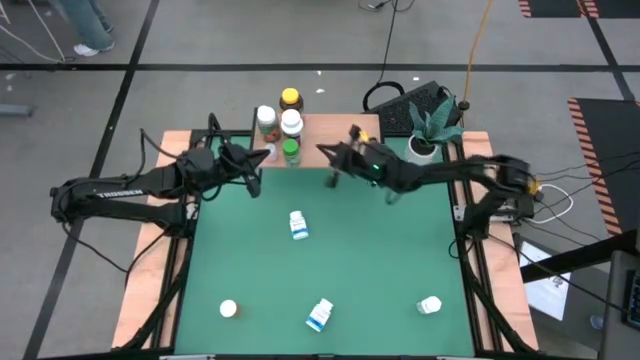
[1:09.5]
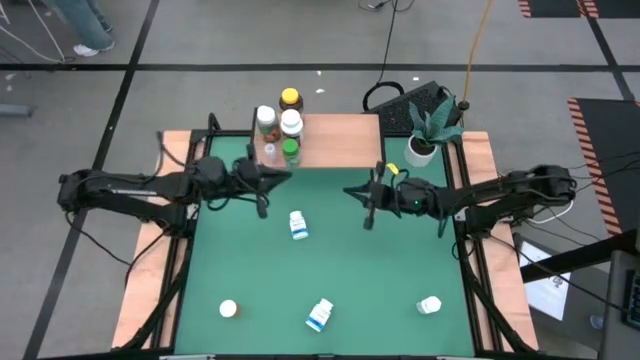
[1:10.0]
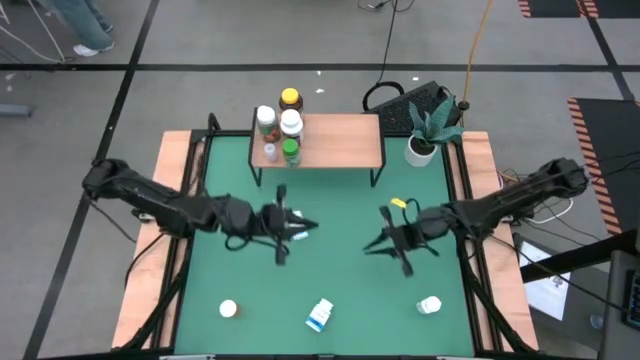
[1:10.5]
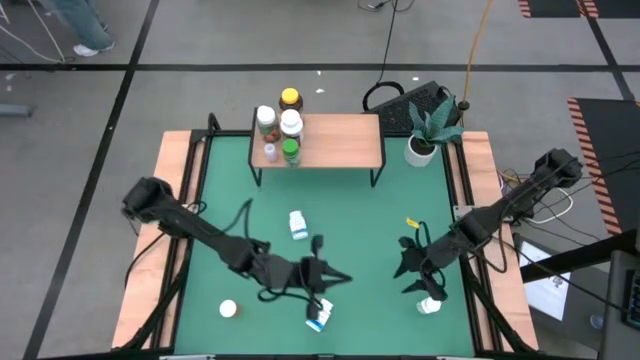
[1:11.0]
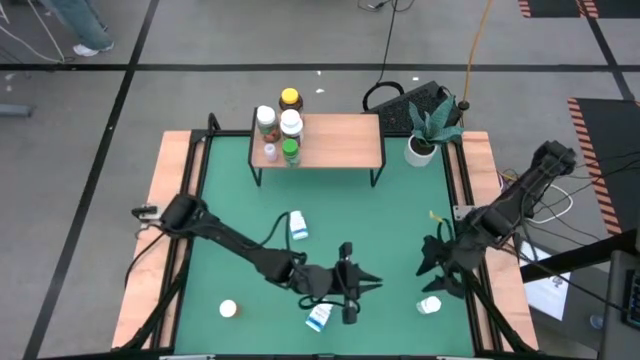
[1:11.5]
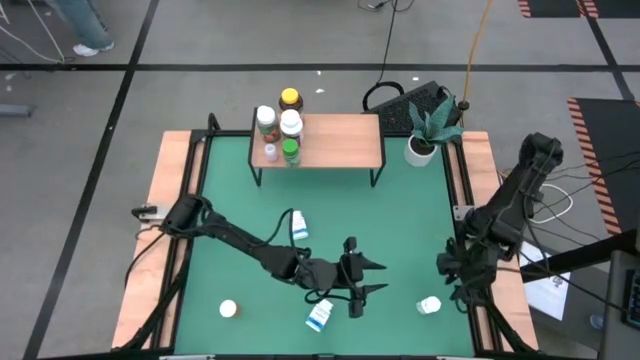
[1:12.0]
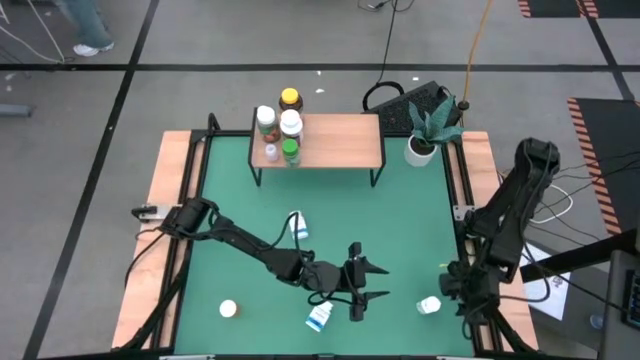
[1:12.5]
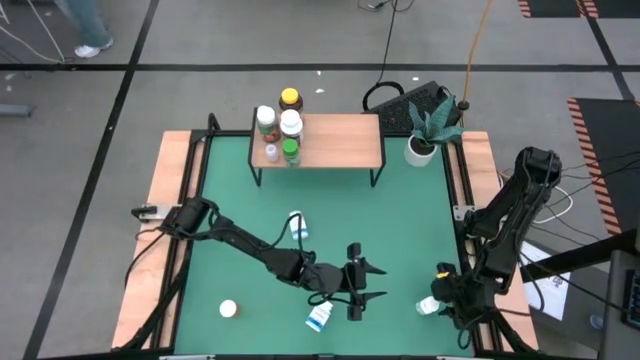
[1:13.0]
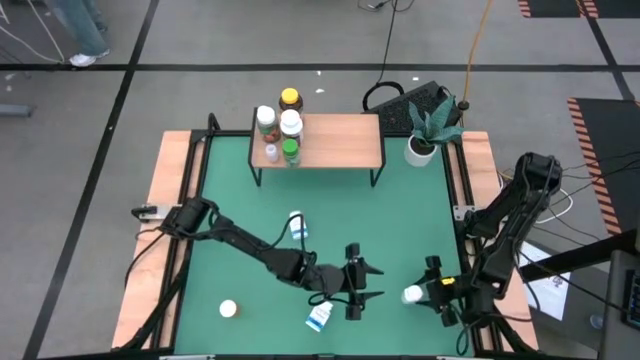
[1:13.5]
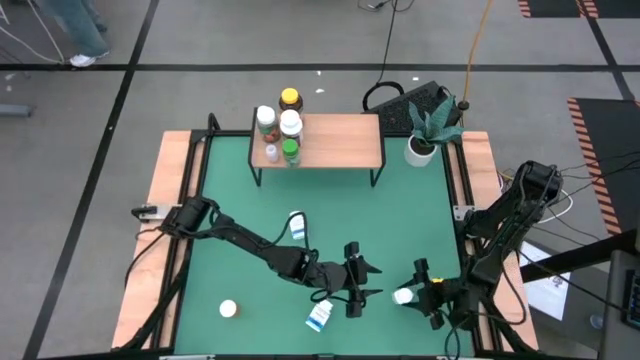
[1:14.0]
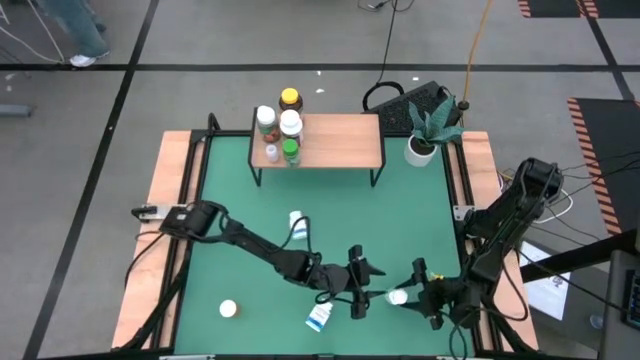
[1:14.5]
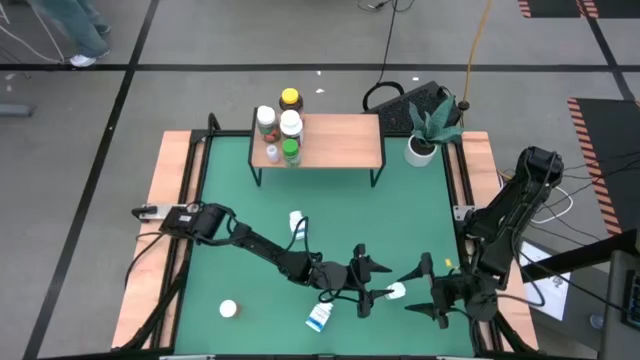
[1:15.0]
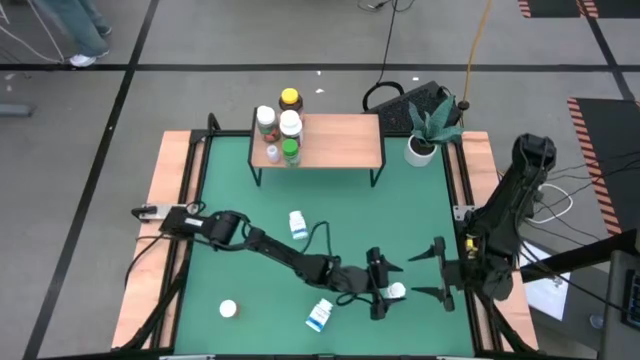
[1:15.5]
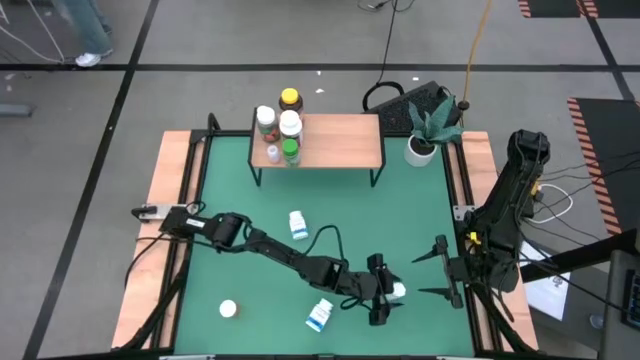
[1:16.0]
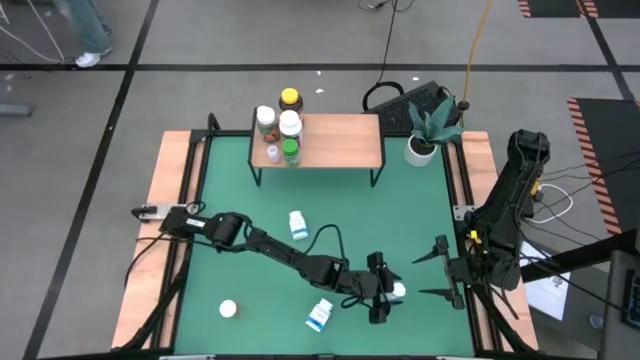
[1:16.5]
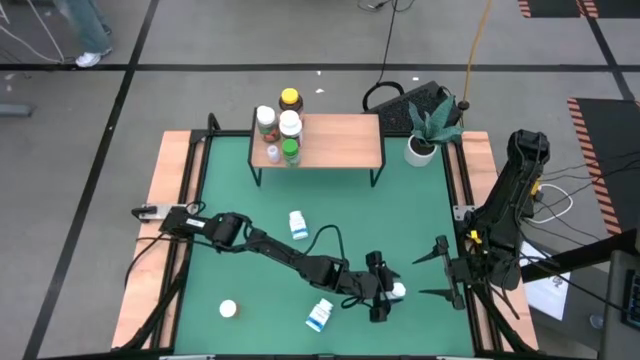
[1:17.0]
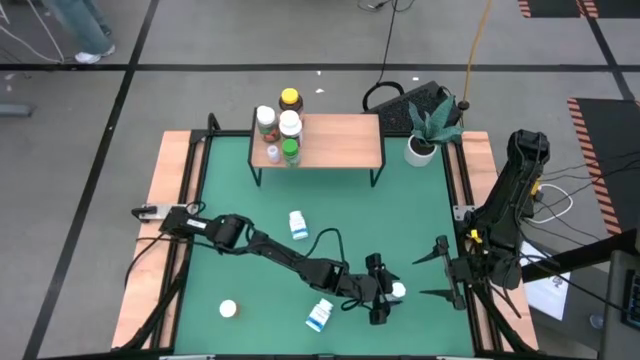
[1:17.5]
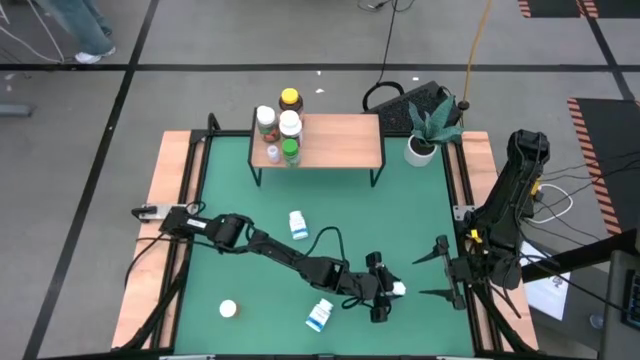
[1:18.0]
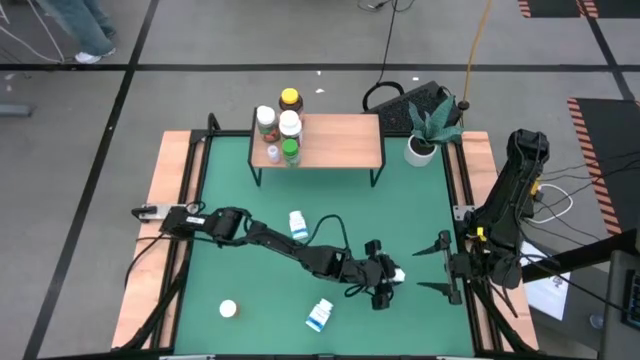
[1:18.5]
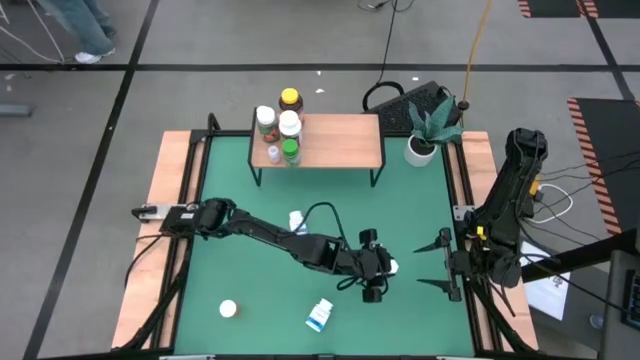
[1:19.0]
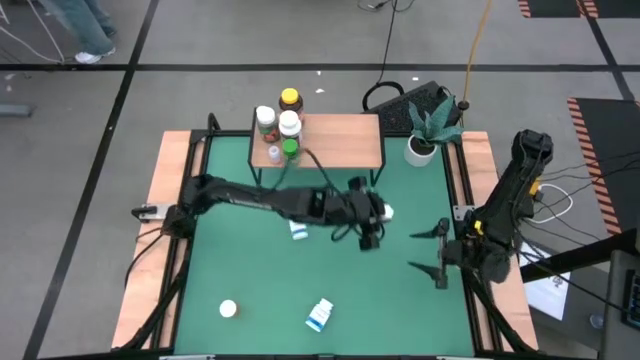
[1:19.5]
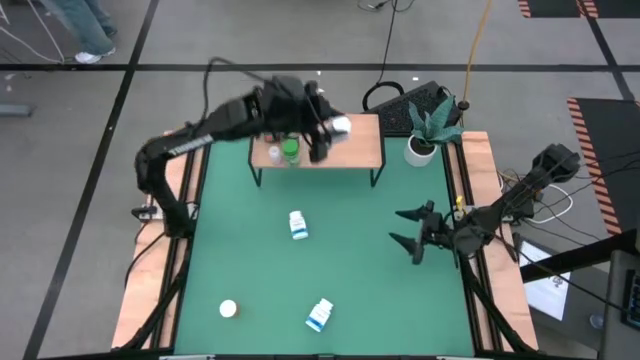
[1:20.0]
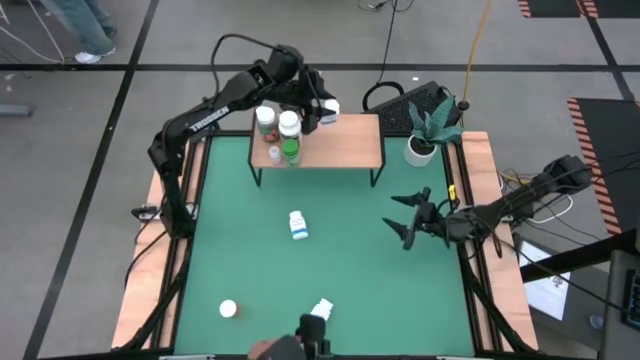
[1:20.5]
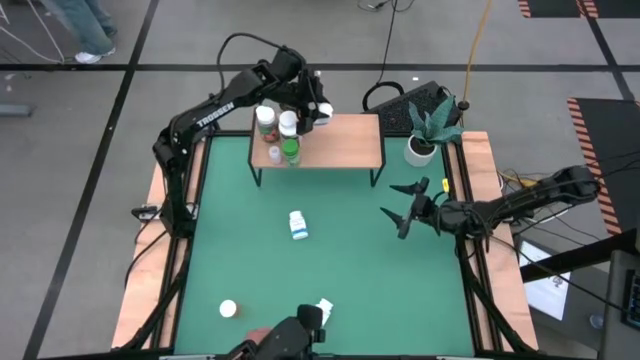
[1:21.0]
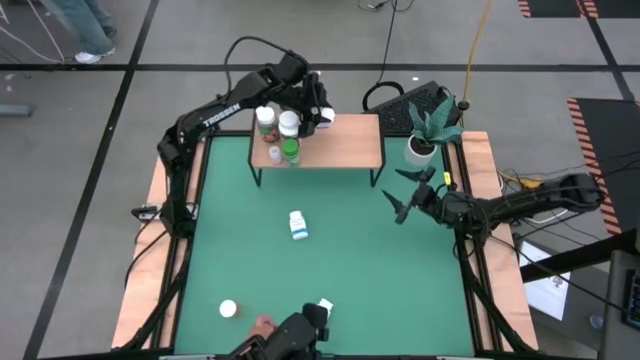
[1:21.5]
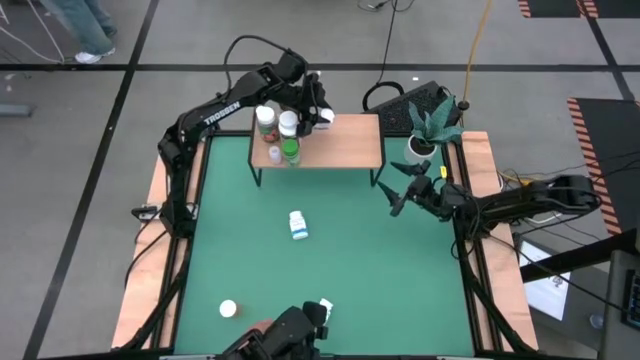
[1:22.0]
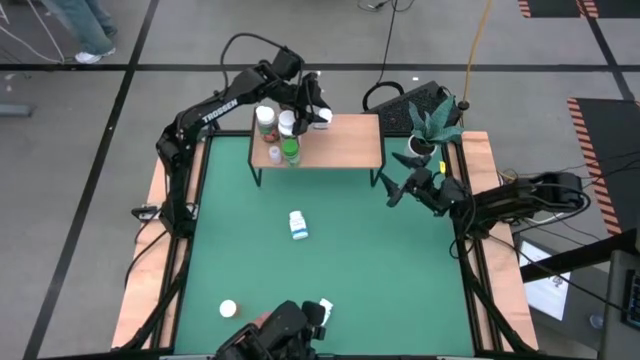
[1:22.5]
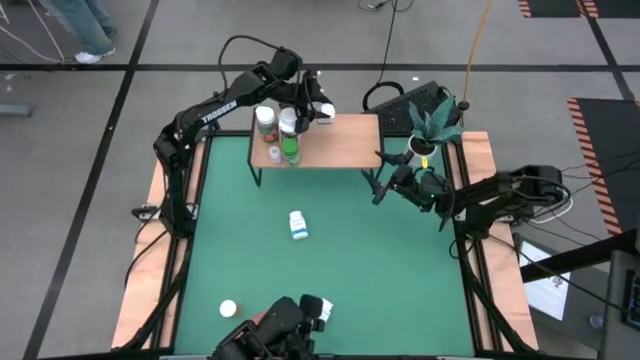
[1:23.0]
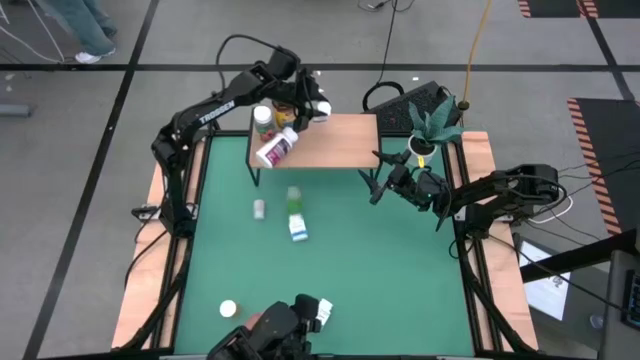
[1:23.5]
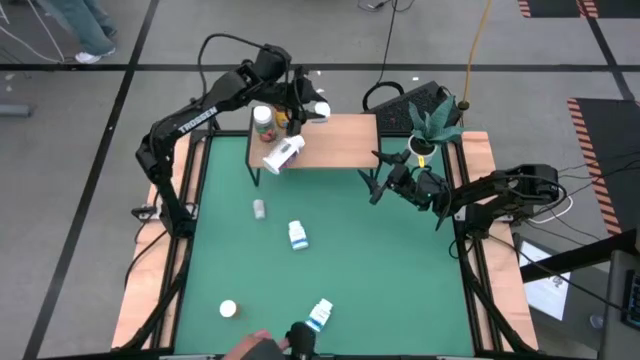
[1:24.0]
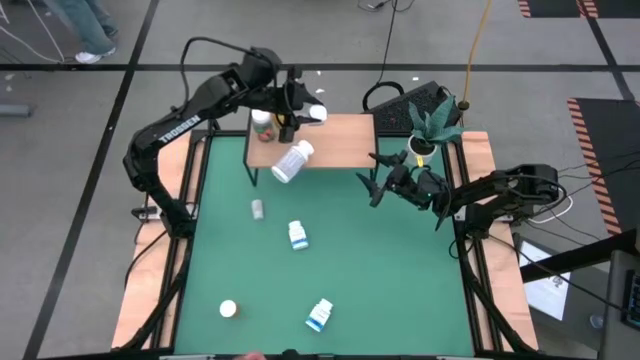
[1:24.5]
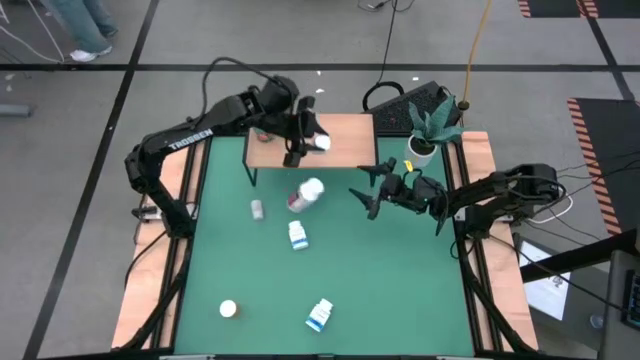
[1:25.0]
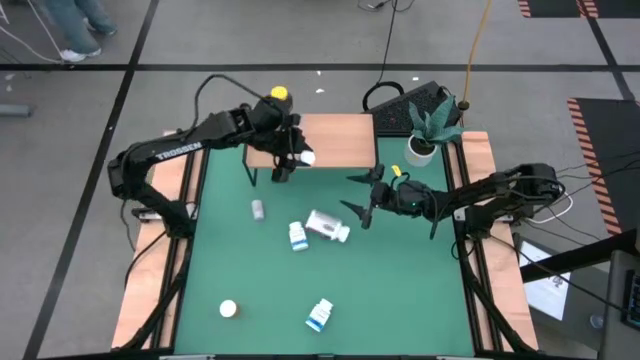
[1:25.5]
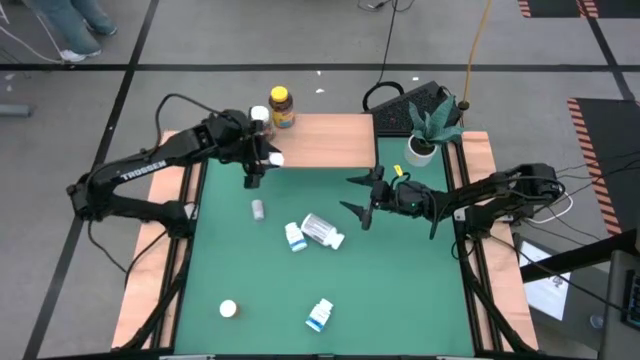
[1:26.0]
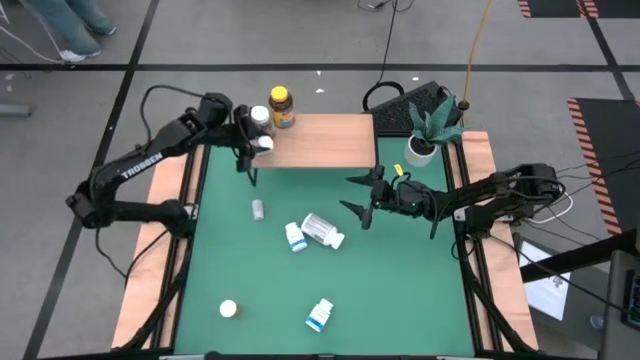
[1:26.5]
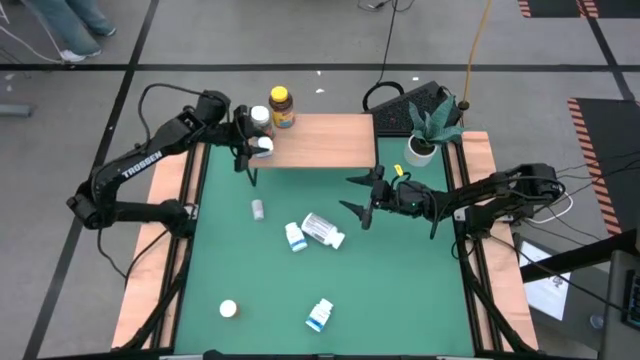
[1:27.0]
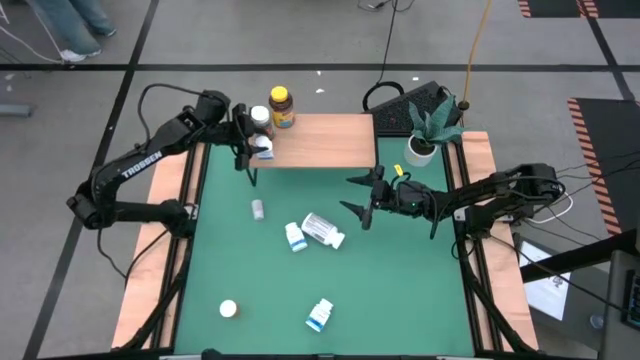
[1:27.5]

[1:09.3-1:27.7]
Task: Pick and place medicine bottles onto shelf by color
Put the bottom right white blue medicine bottle on the shelf

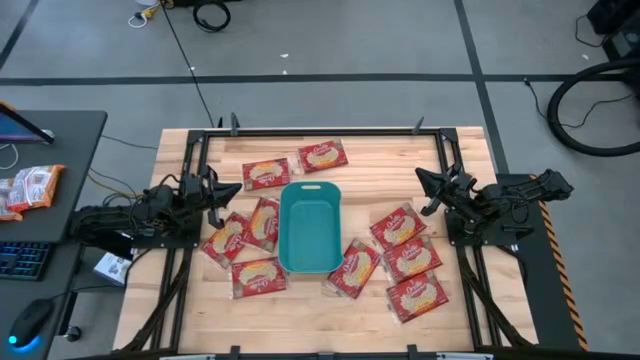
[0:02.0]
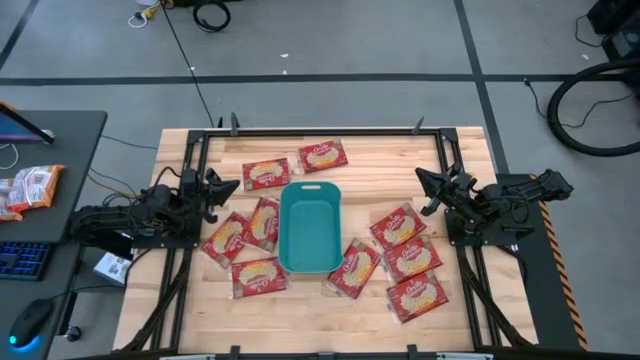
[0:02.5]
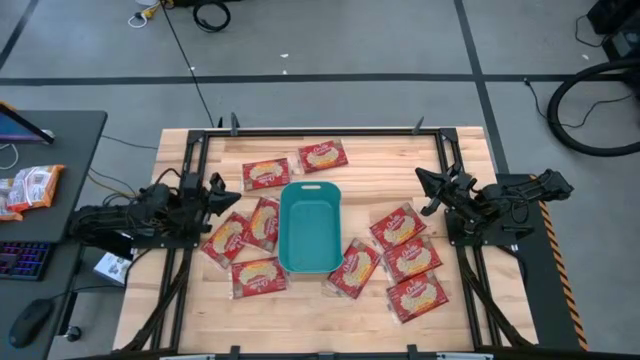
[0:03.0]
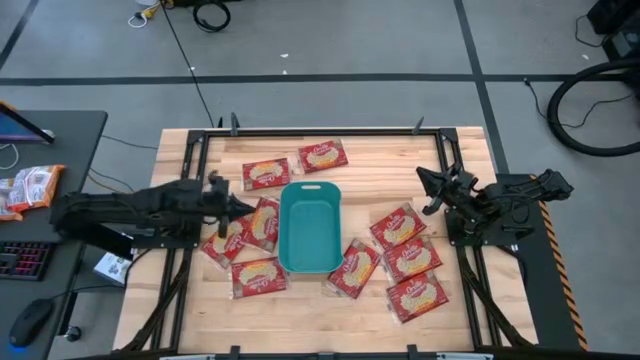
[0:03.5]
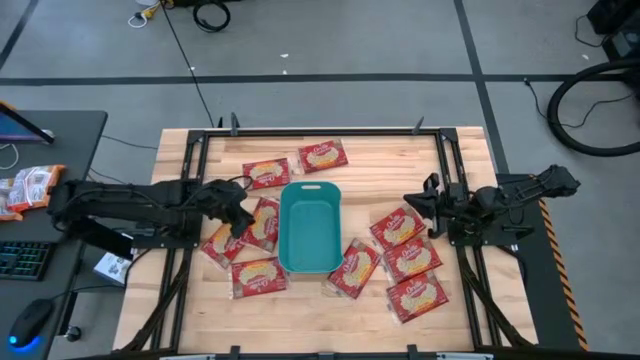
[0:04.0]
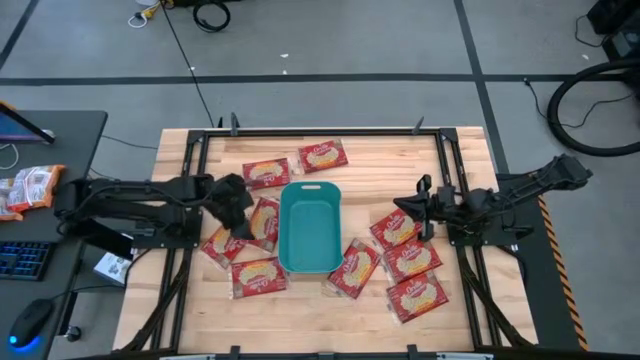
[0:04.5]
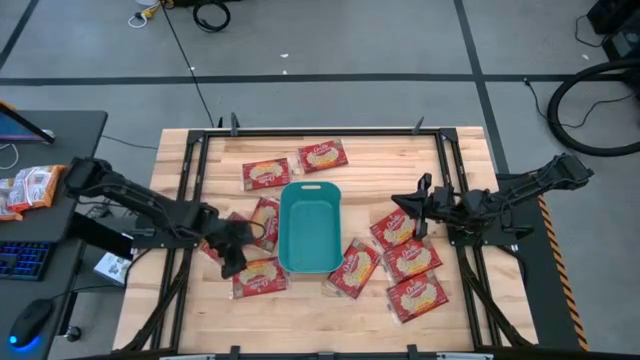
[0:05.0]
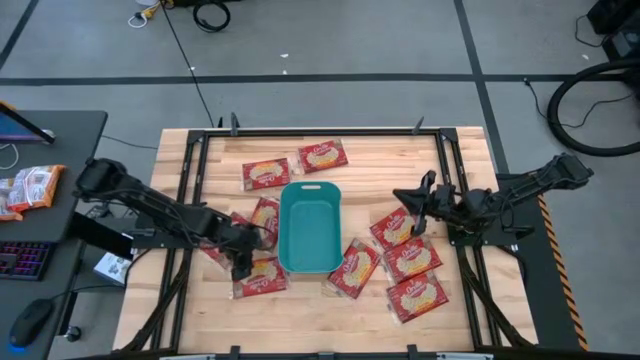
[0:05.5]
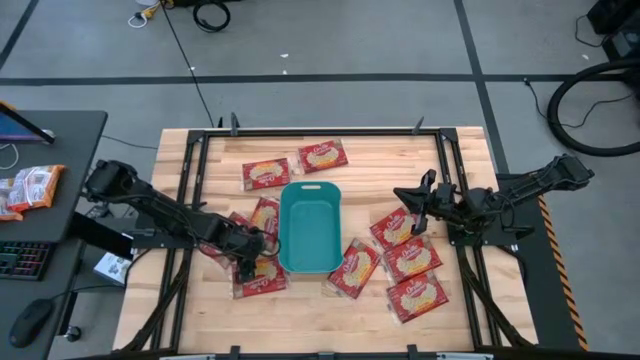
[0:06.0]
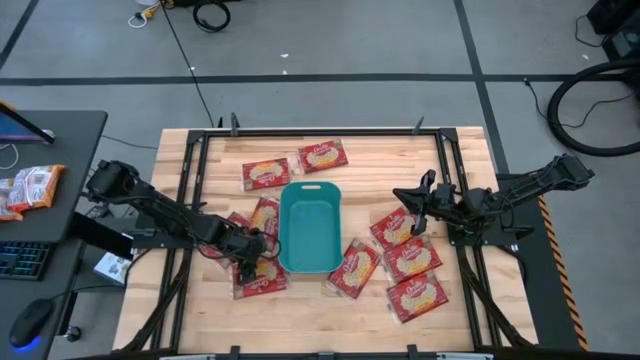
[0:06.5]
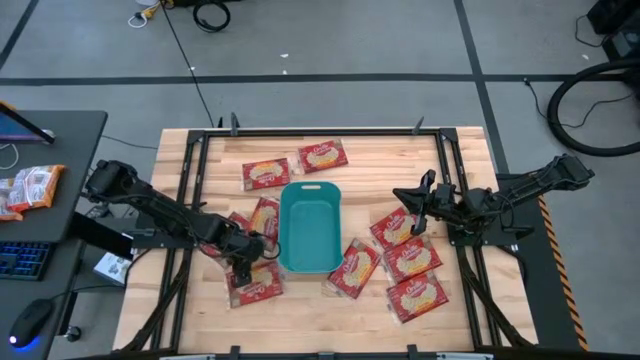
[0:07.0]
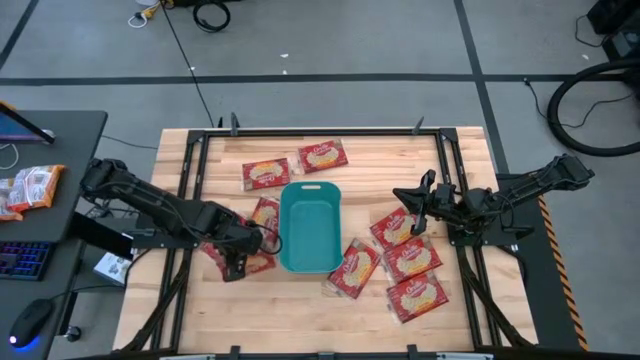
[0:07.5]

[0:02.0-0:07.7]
Task: Sort popcorn bags into baskets
Put the red popcorn bag into the green bin
